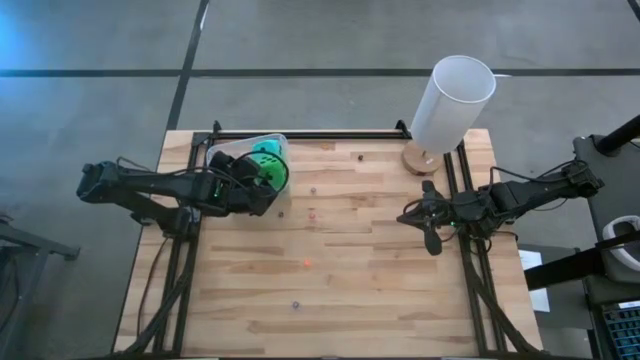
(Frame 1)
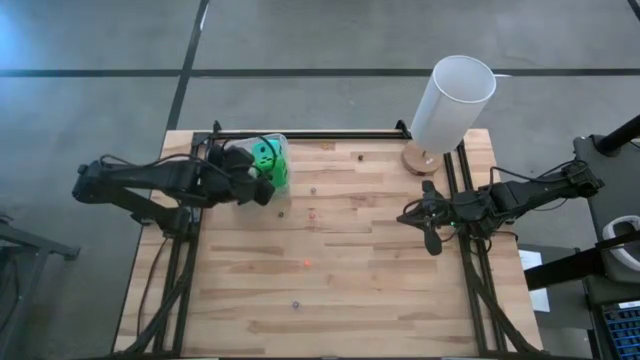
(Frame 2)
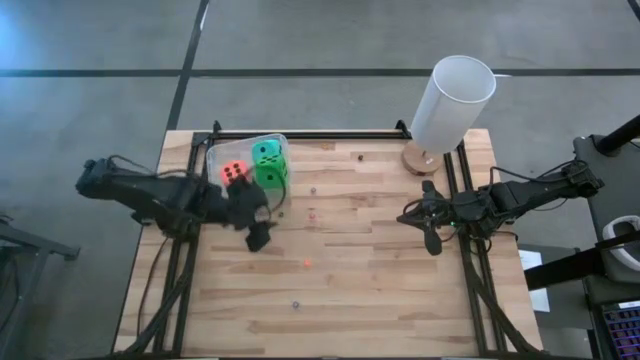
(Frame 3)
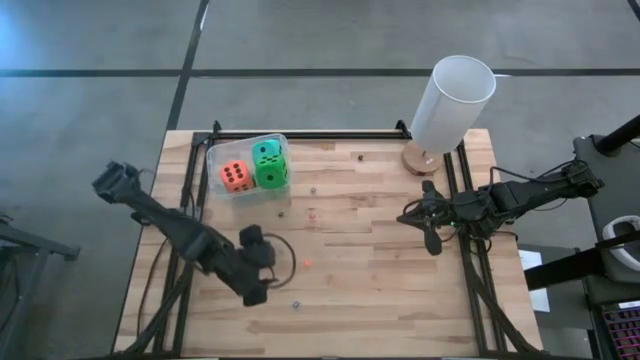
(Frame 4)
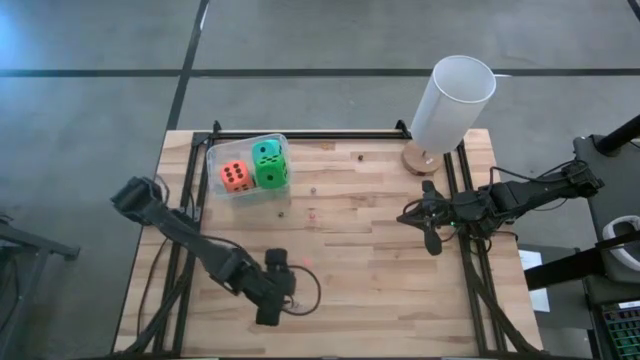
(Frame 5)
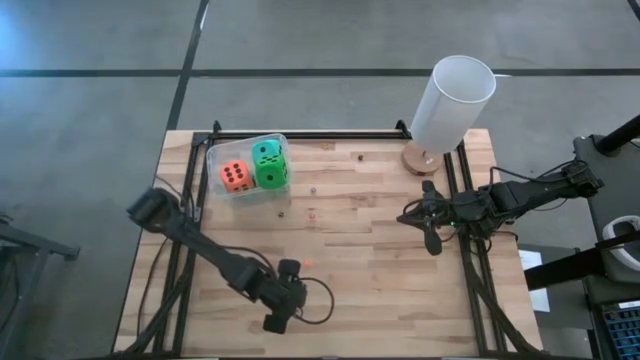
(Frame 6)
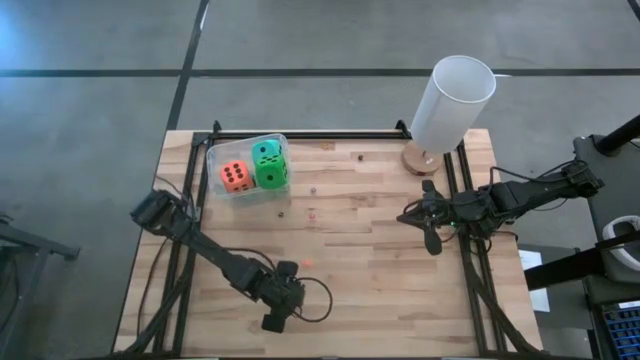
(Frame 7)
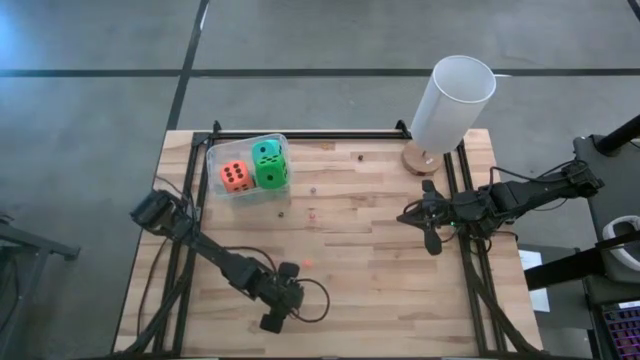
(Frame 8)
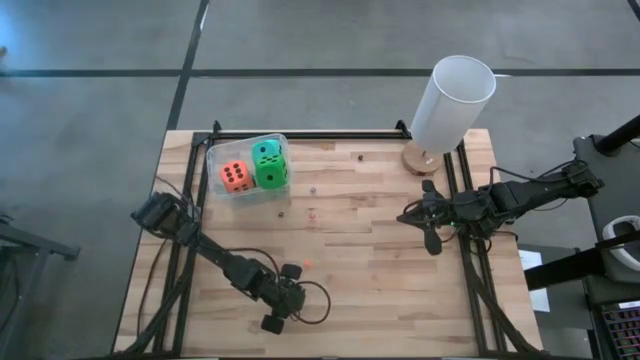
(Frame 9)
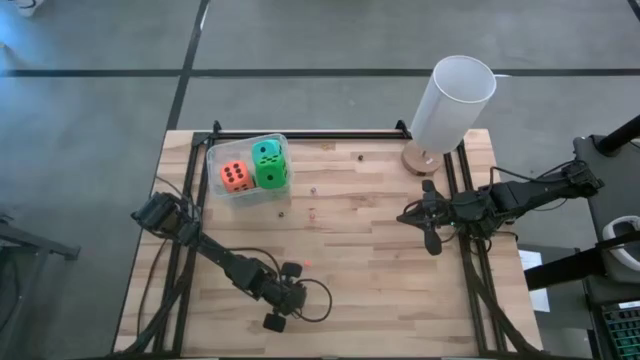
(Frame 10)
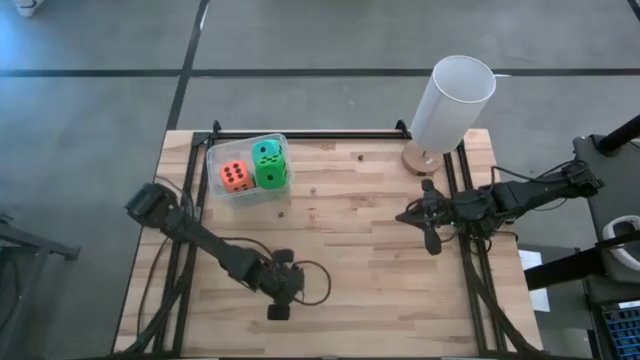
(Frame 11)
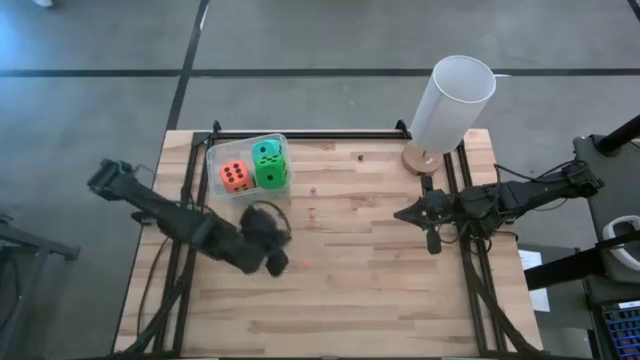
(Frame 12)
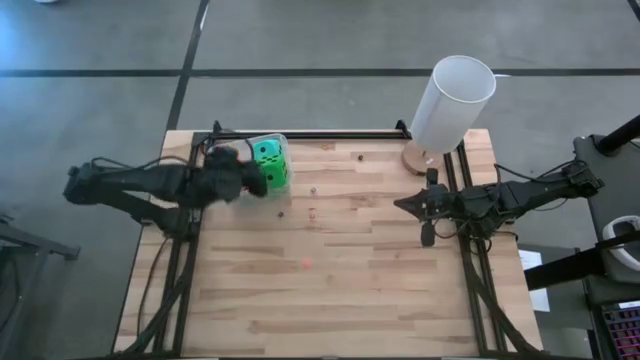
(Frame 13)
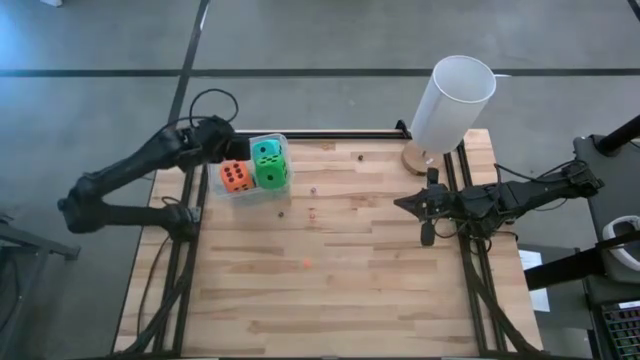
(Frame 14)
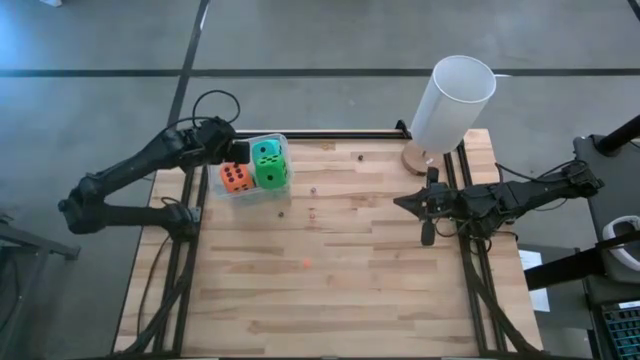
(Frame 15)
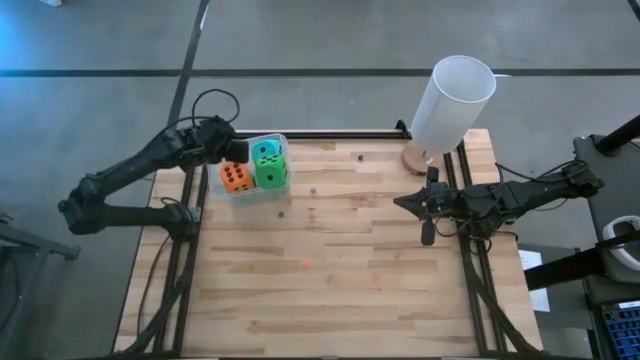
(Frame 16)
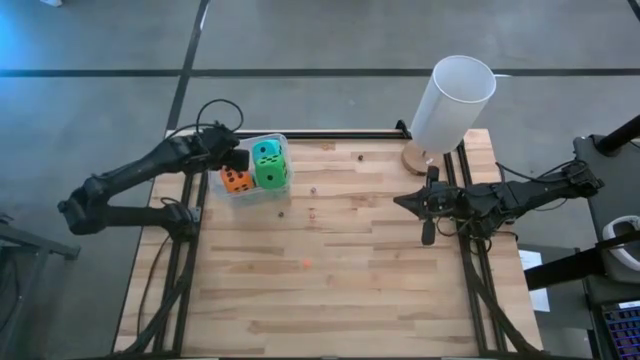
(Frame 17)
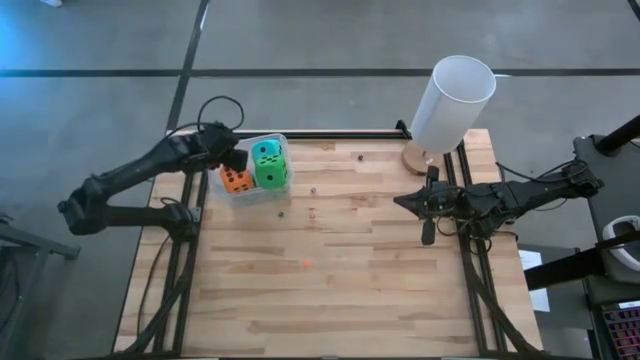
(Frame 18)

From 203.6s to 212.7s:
Task: Pick & Place Dice
Put the small blue dice into the transparent bin

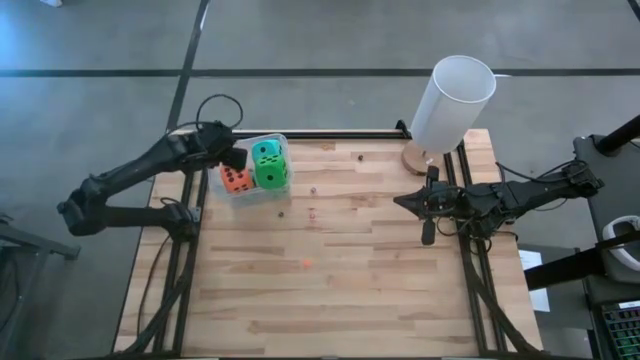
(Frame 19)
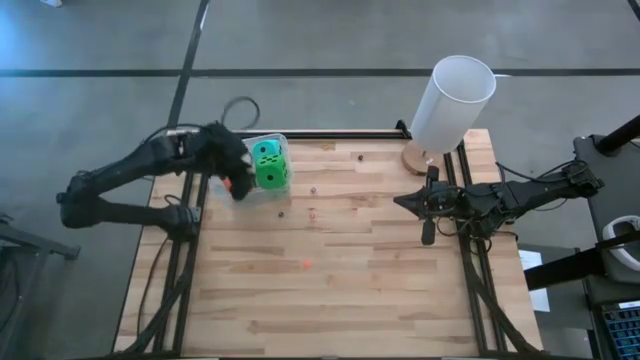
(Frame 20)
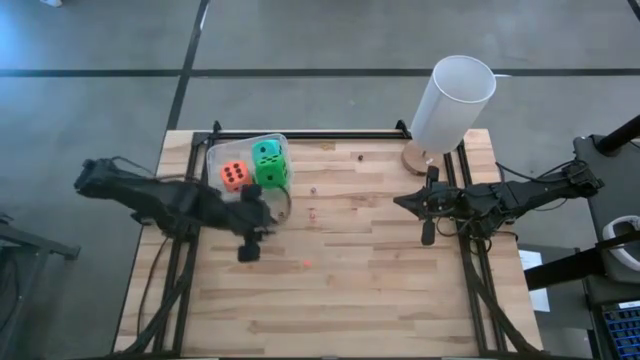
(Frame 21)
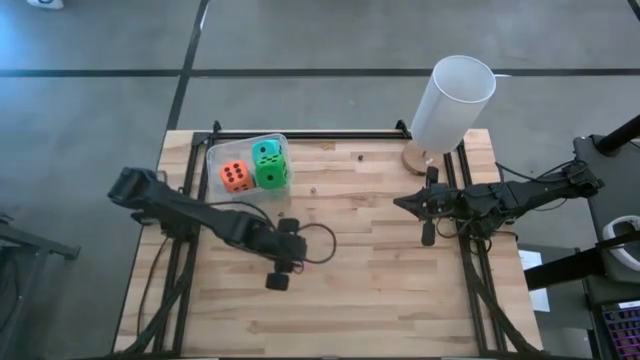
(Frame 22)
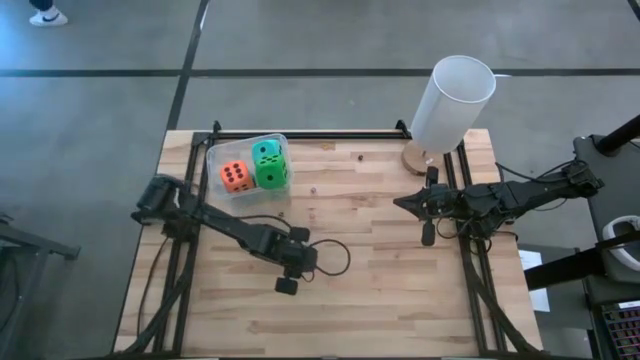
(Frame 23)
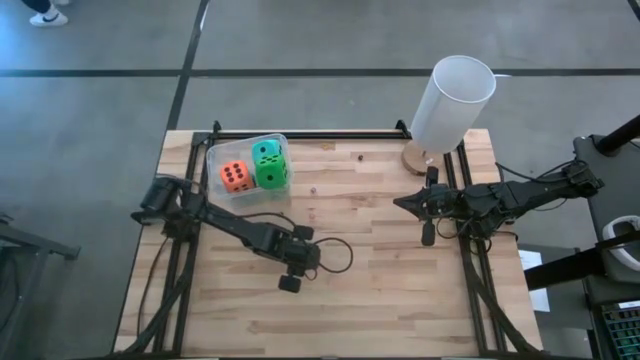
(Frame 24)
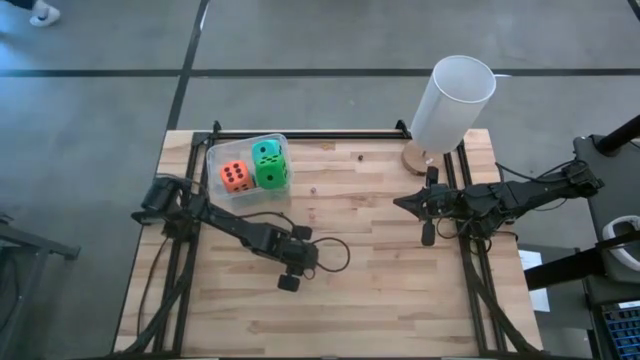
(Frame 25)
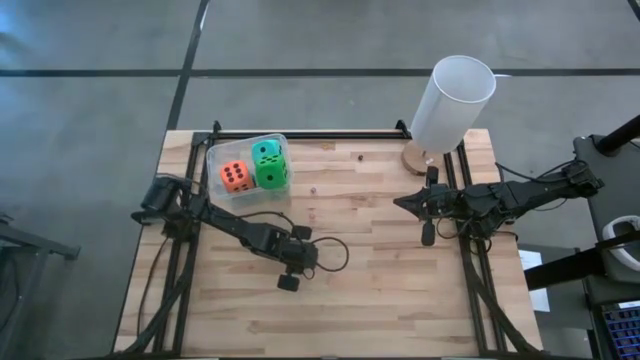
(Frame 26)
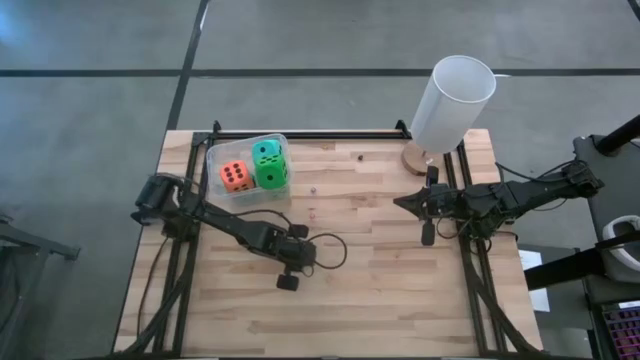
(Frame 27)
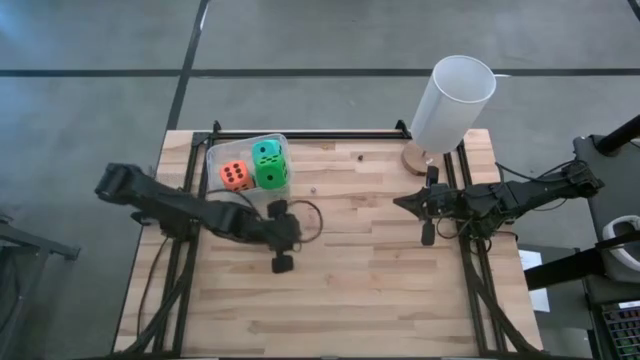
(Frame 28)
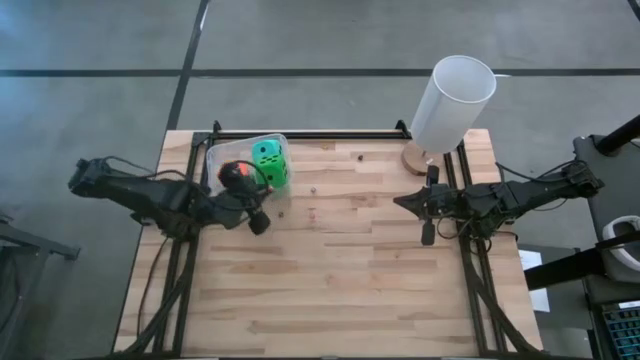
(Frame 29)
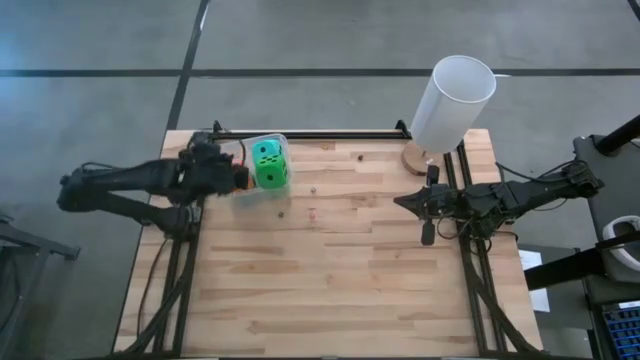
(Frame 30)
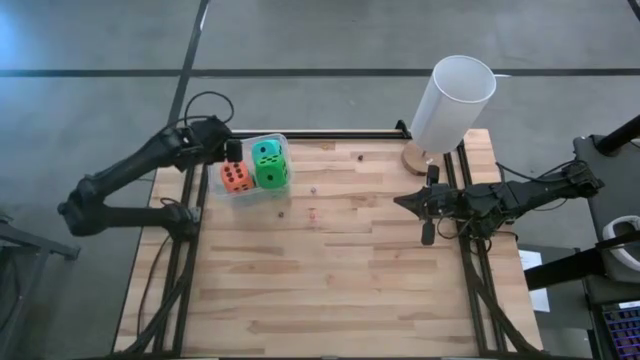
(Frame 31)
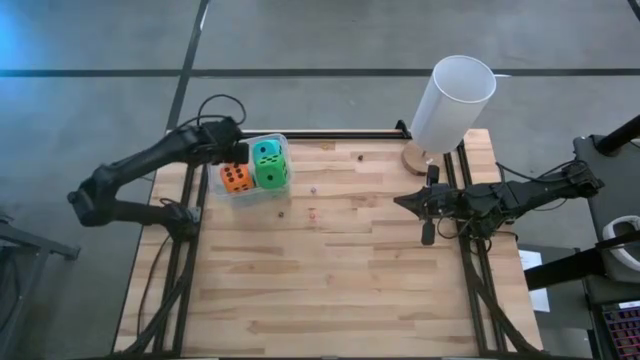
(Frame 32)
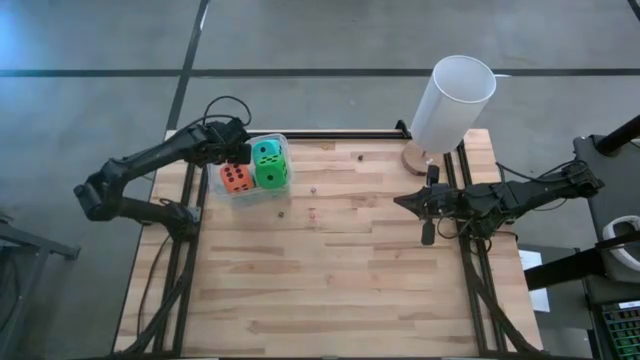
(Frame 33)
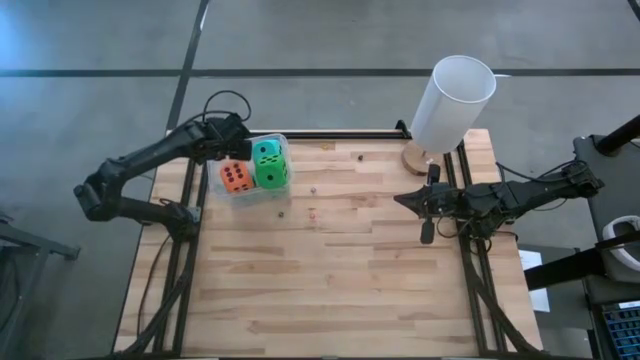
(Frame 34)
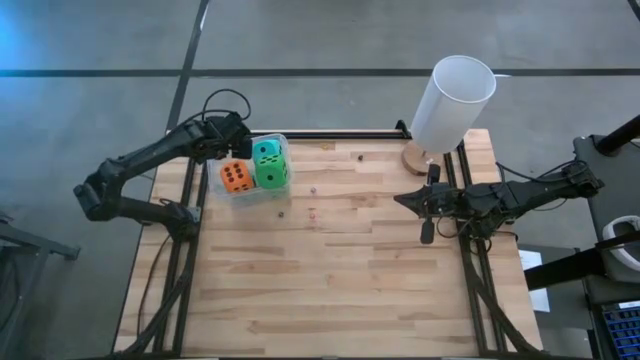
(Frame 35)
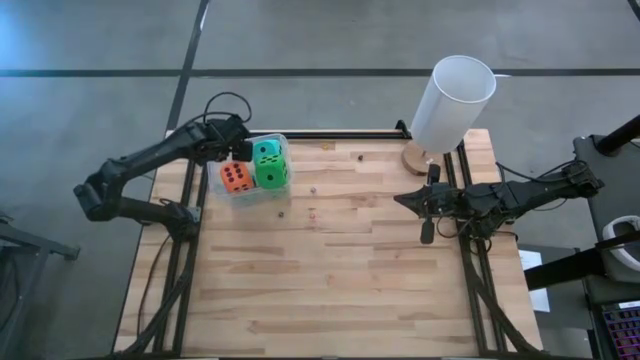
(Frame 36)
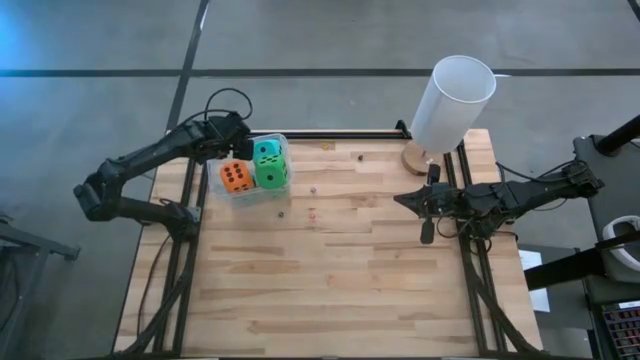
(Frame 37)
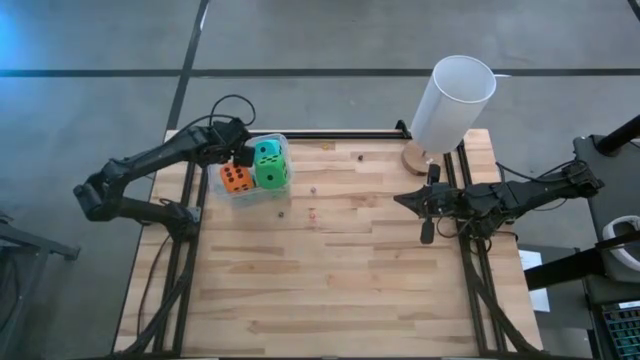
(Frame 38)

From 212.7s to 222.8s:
Put the small orange dice into the transparent bin

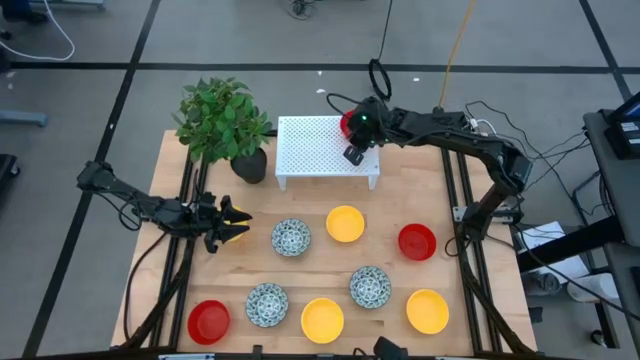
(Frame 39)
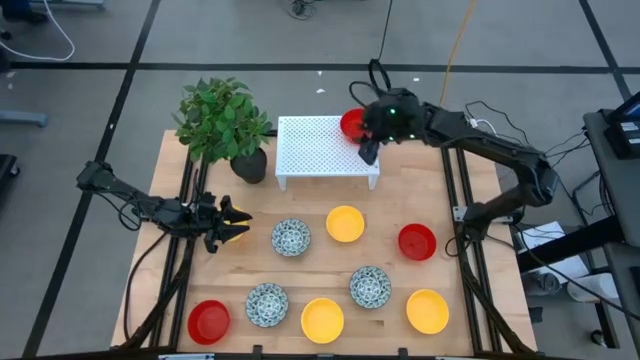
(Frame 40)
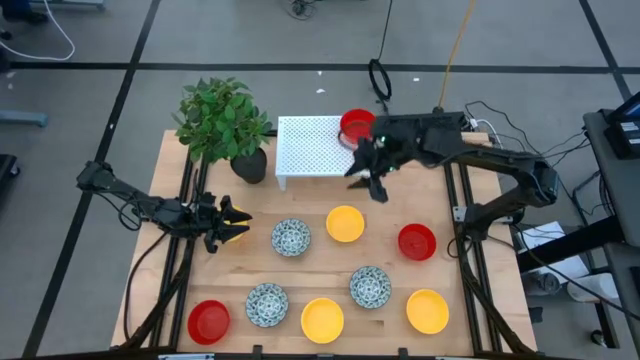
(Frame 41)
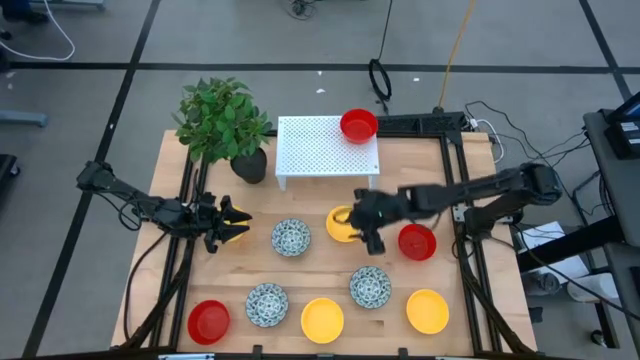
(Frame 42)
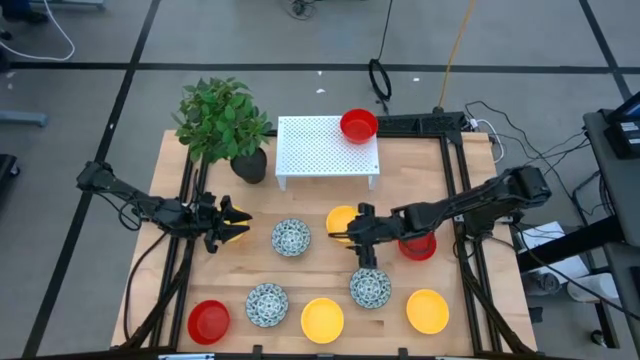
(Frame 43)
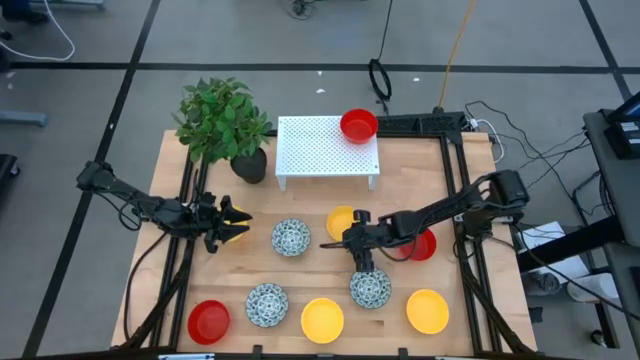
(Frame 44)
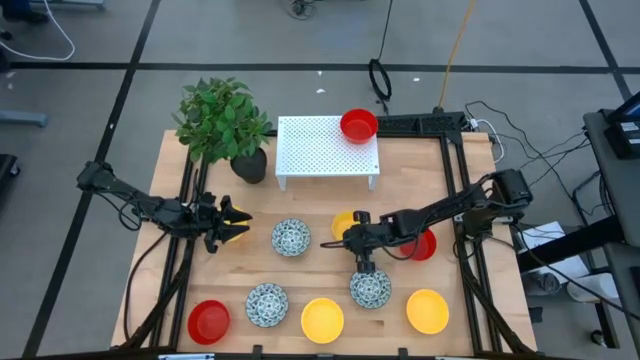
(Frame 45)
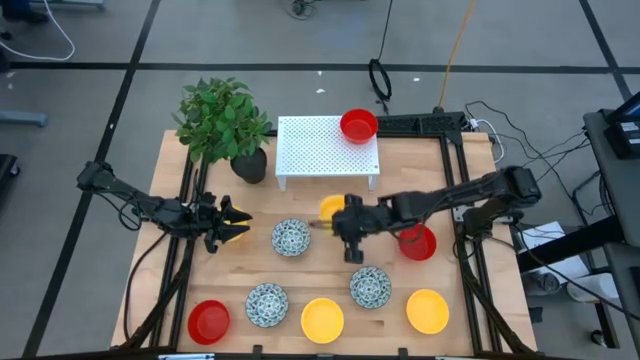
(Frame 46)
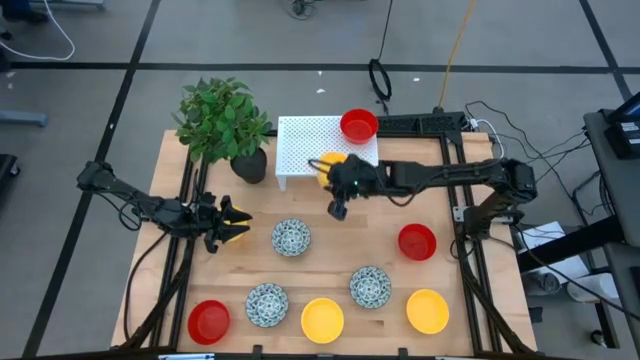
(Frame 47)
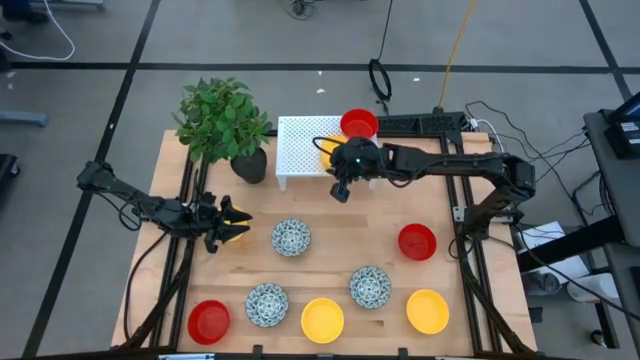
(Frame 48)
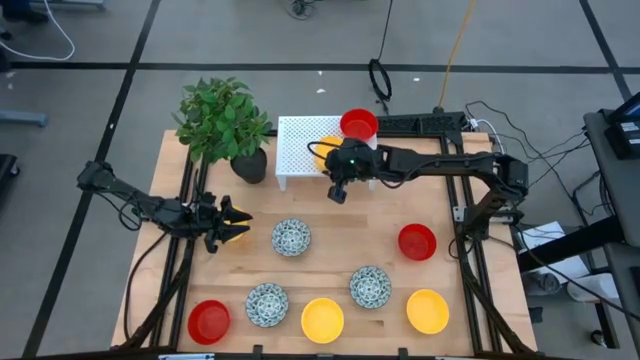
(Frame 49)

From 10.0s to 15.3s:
Task: Pick & Place Mini bowls
Put the yellow bowl on the shelf
